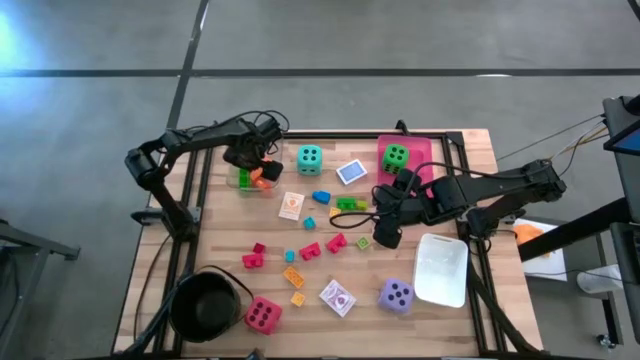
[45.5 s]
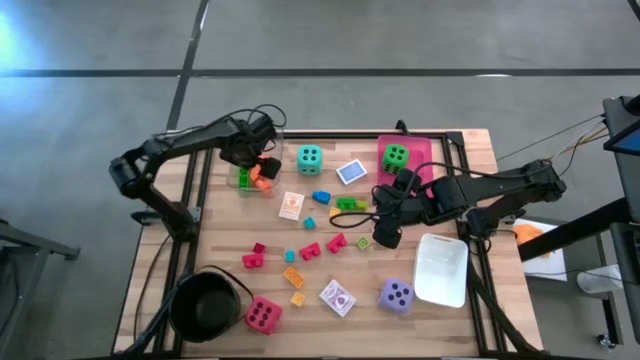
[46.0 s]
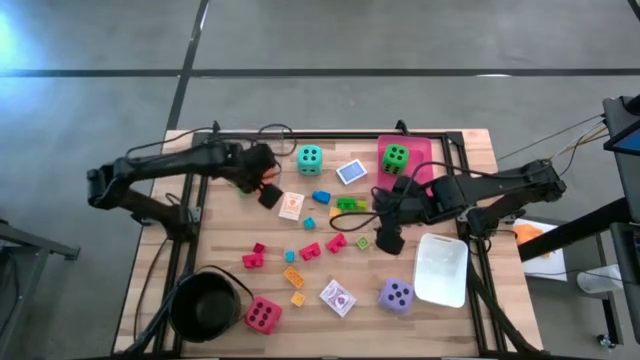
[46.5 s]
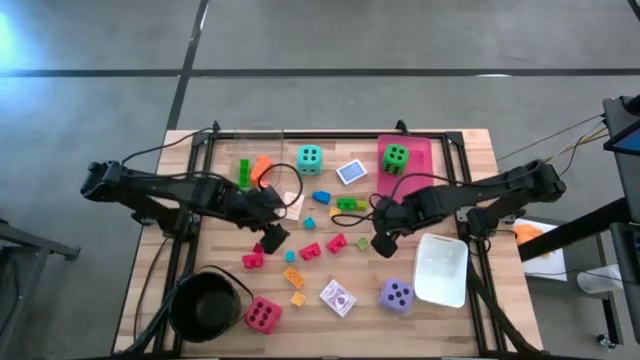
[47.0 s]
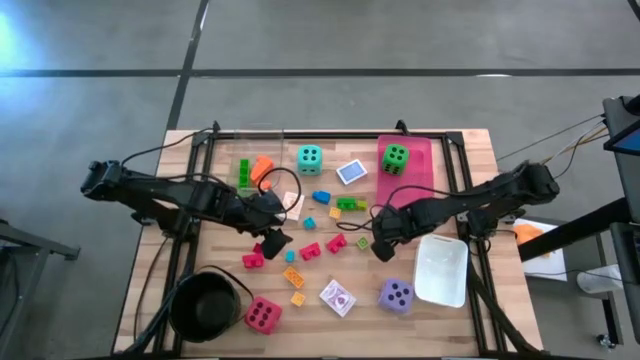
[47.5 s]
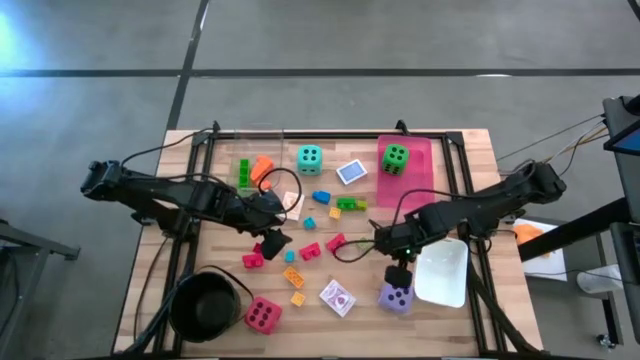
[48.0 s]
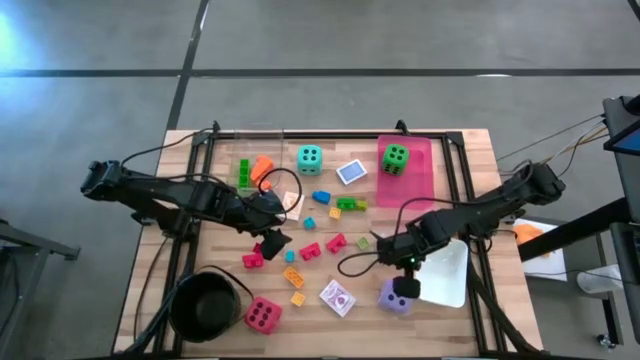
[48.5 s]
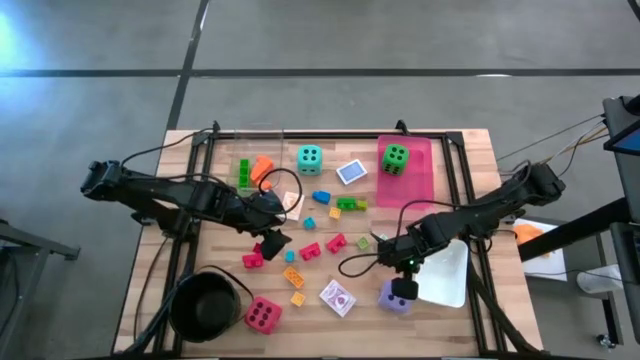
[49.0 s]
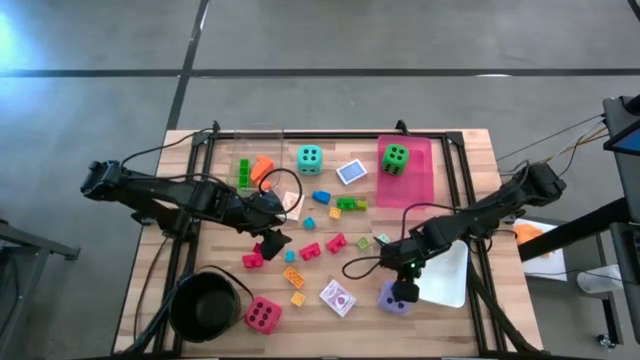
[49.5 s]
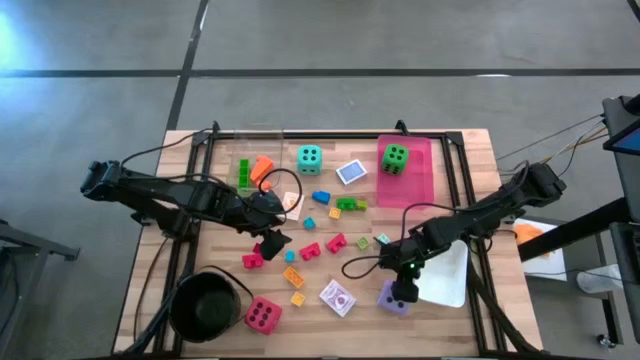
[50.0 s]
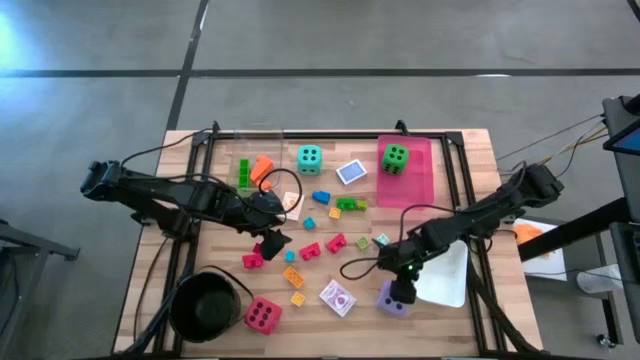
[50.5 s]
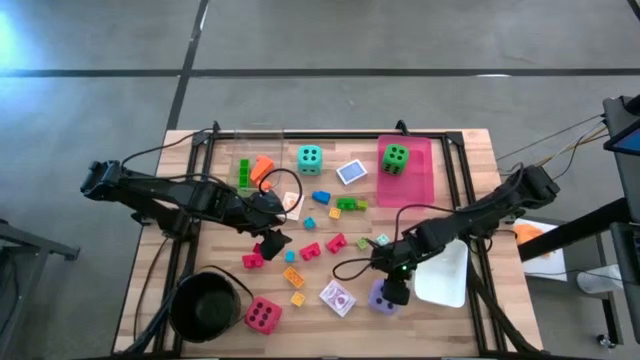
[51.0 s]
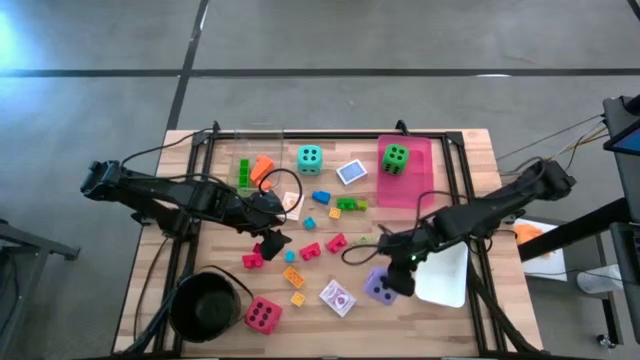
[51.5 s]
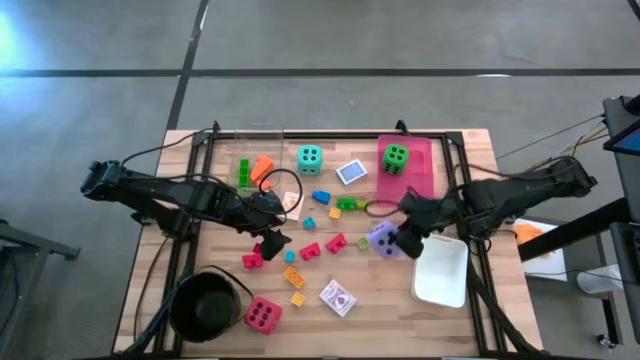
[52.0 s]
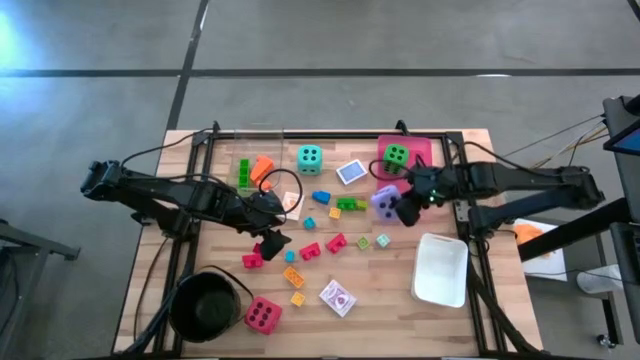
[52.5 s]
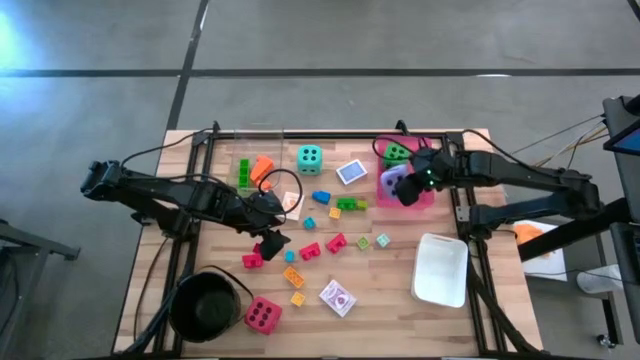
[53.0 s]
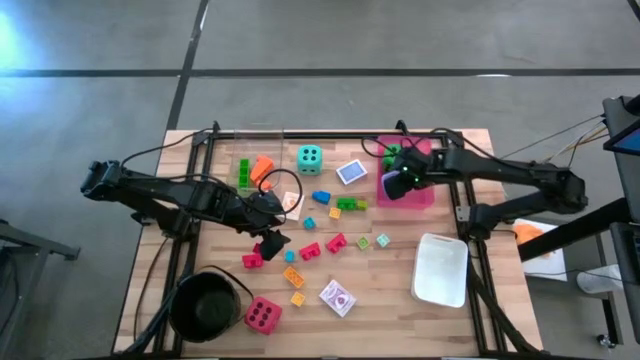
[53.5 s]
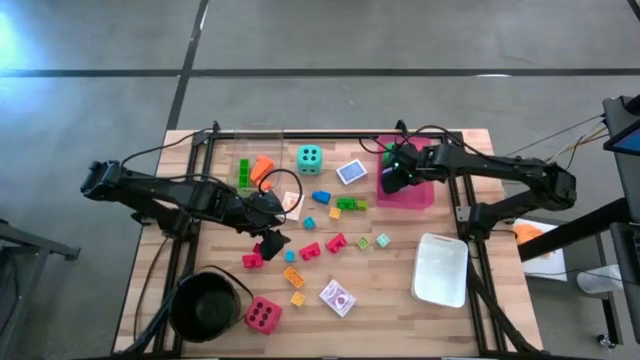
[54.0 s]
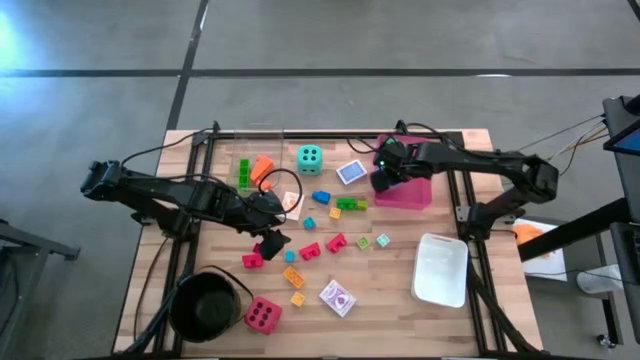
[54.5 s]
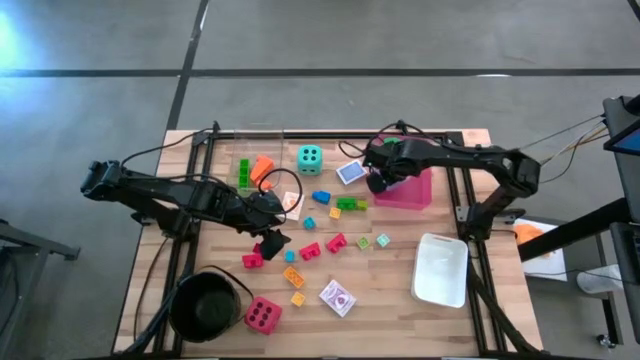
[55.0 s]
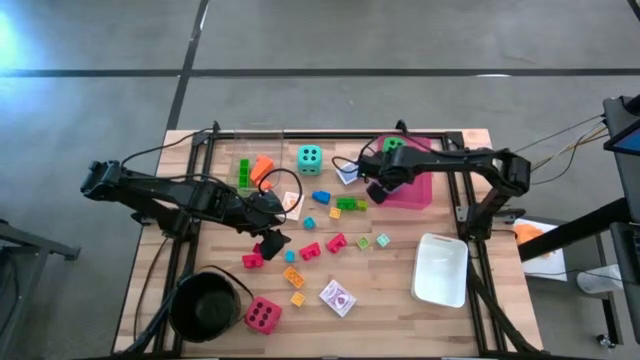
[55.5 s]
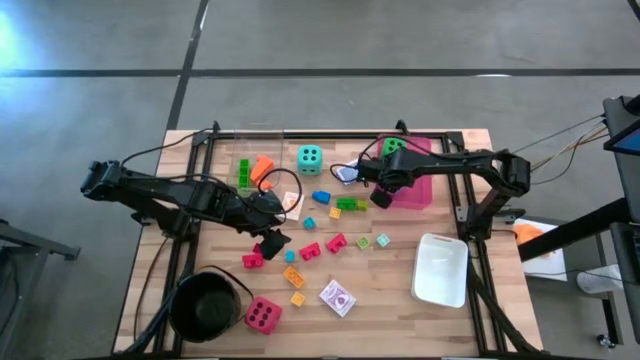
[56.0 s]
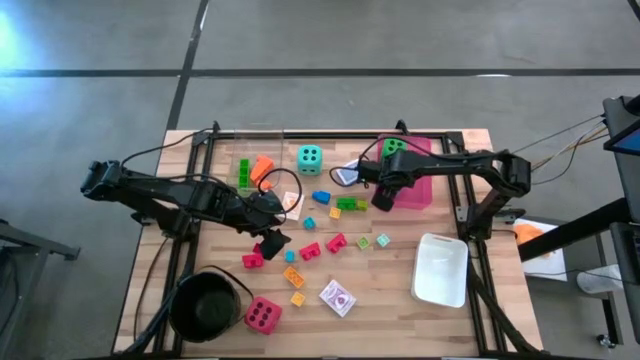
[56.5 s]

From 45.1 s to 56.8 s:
Task: Pick & Place Toys
Put the violet die into the pink bin

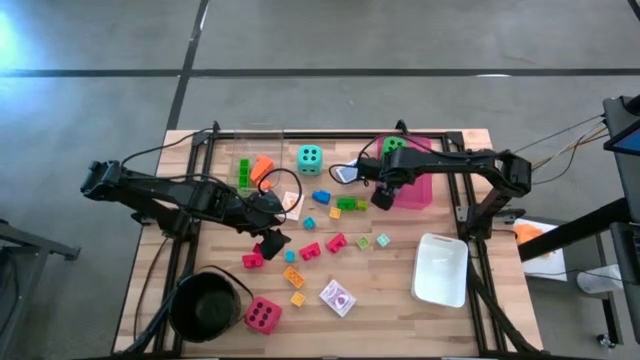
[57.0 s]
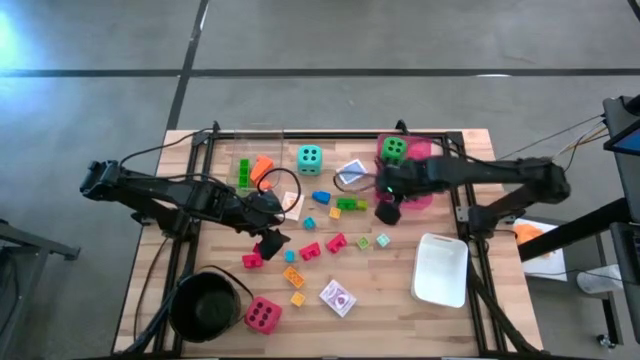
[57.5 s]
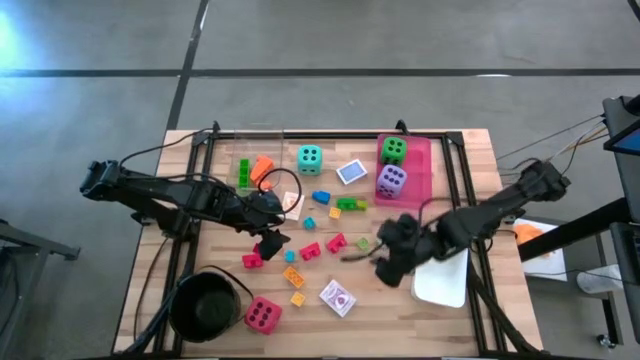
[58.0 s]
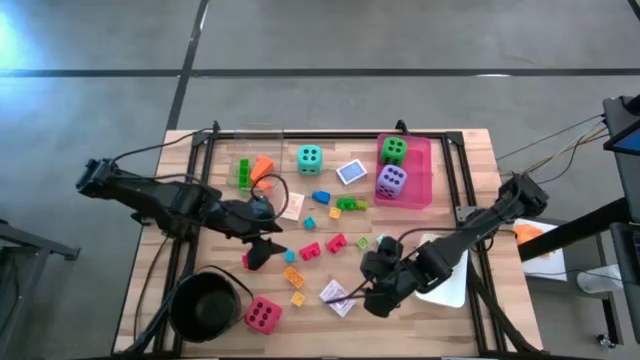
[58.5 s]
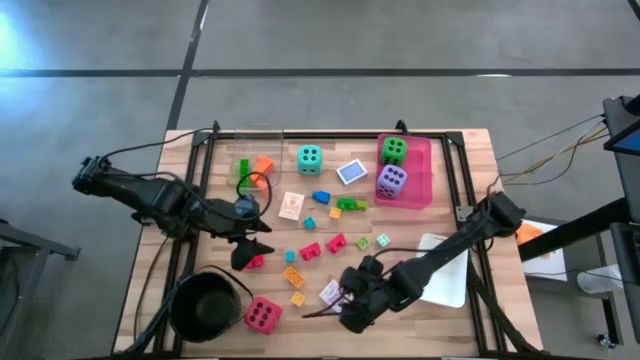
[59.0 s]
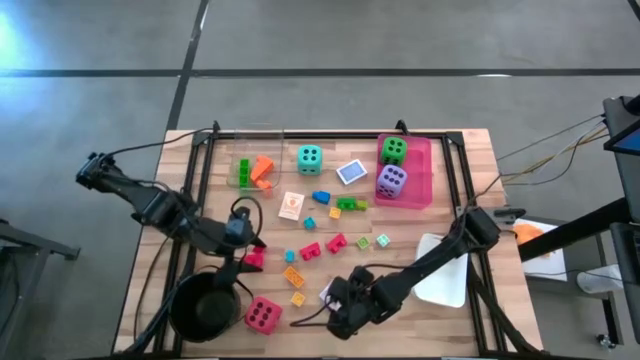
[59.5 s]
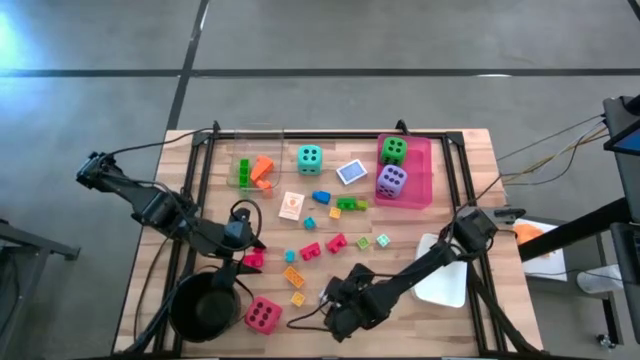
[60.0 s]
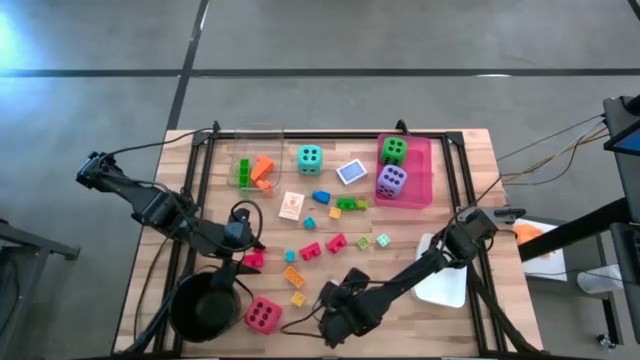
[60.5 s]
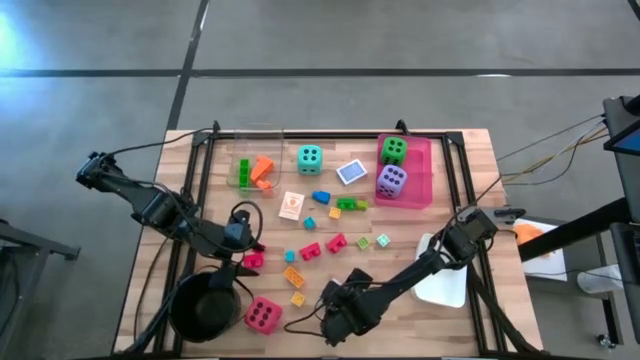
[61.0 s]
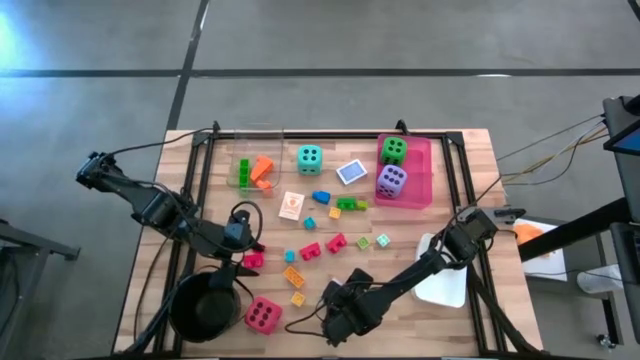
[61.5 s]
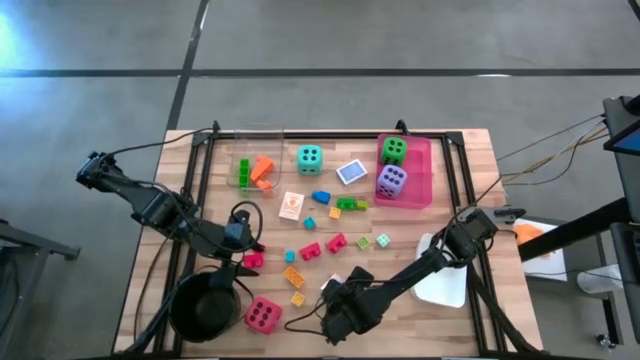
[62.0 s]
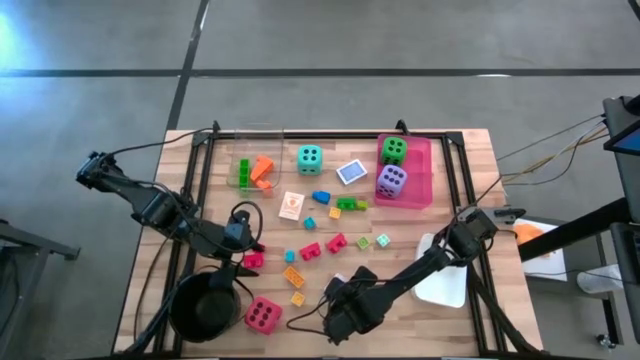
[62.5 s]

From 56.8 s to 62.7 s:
Put the purple deck of cards into the white bin

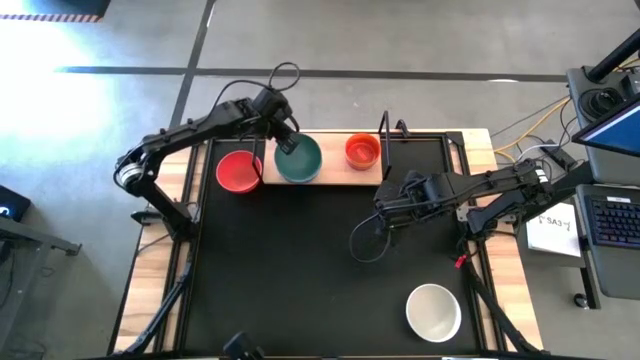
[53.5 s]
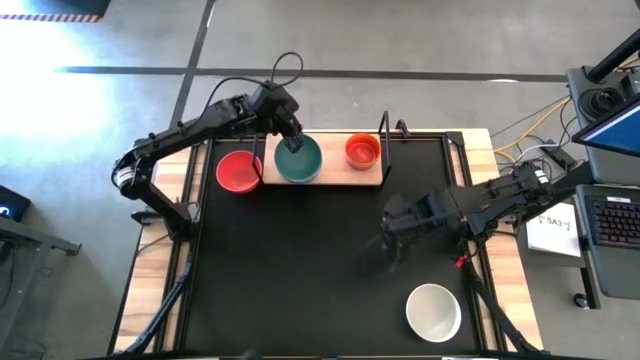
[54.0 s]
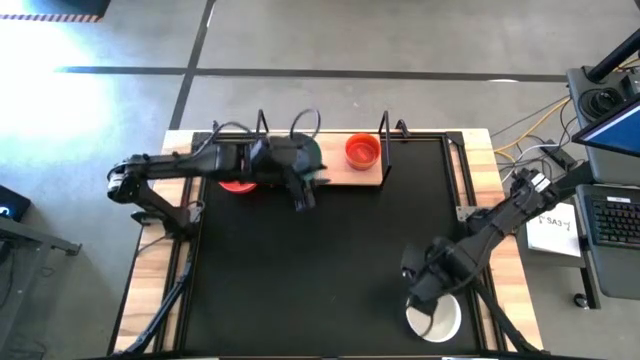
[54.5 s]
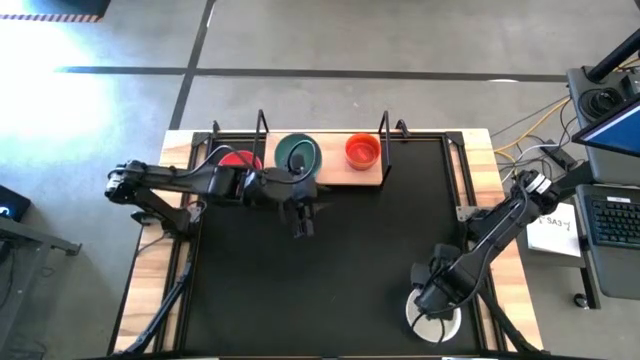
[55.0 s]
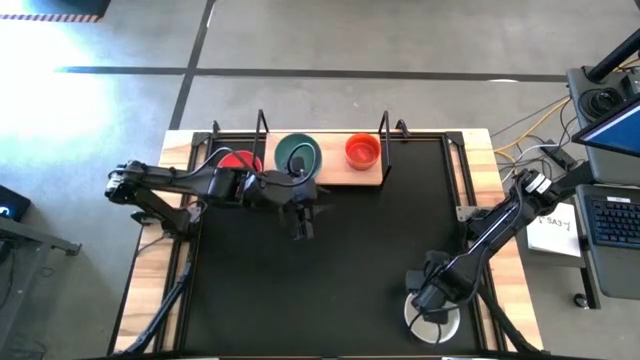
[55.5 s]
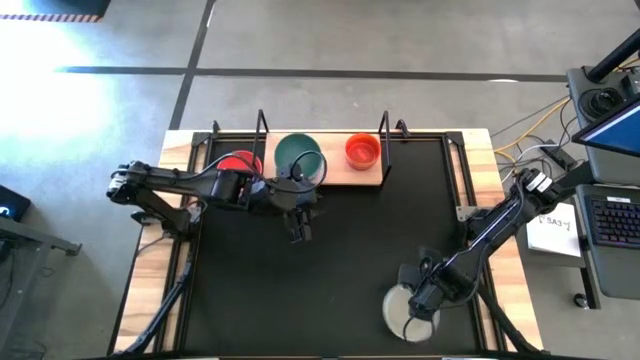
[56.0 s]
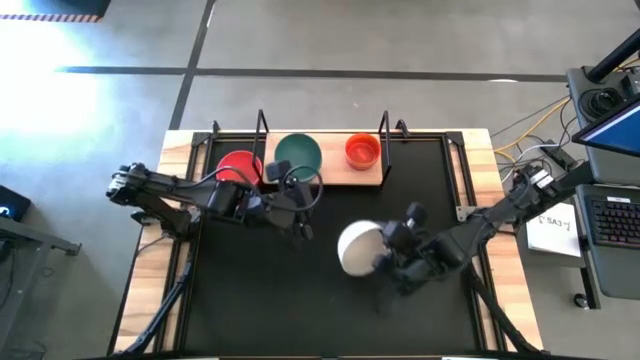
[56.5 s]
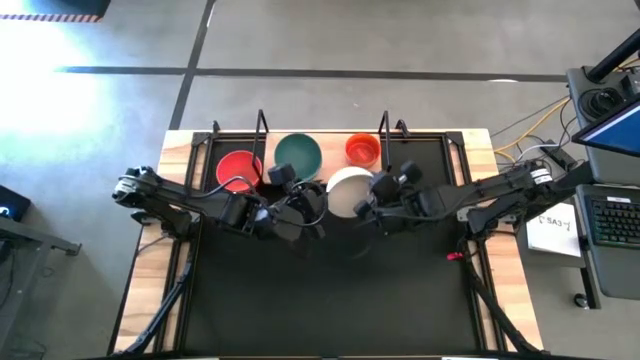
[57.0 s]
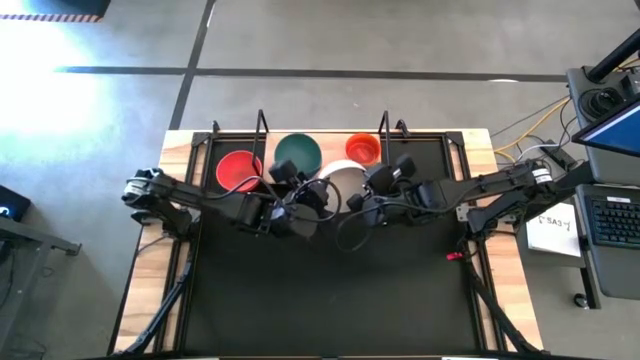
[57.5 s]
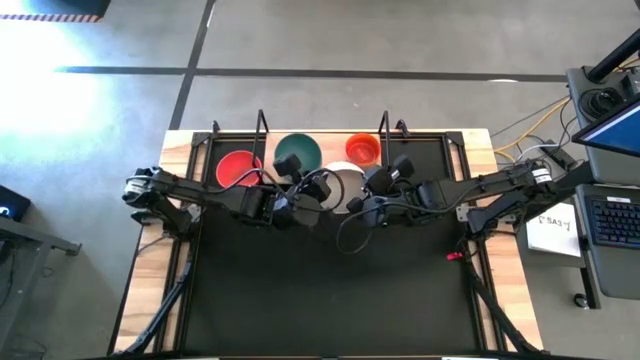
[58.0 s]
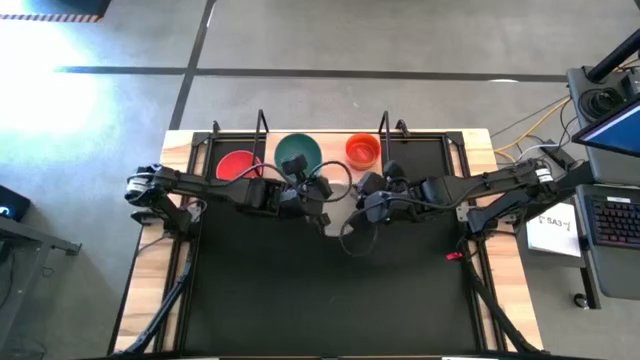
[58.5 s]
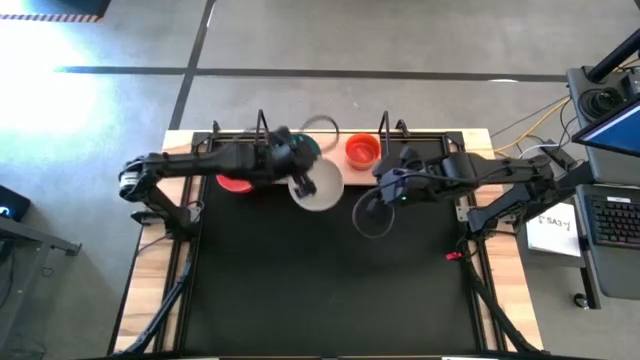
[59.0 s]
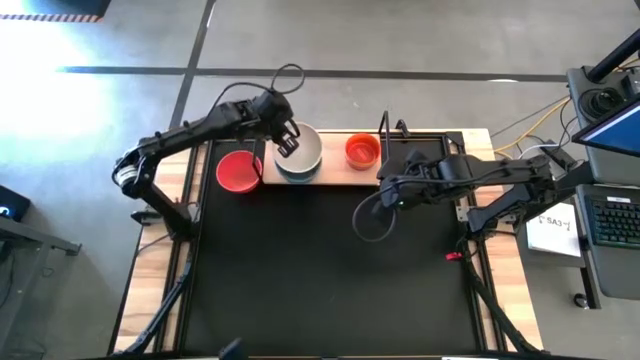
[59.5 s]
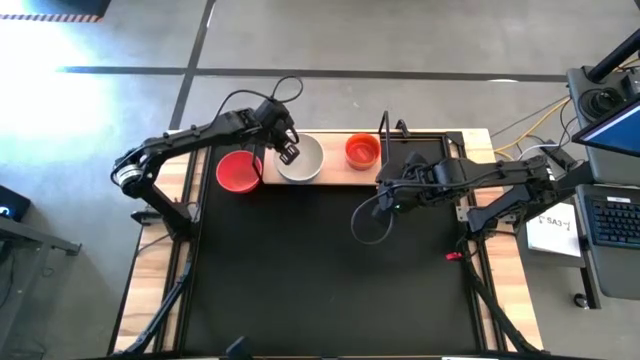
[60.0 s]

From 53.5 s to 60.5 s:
Task: Place and stack bowls onto a shelf
Stack the white bowl on top of the green bowl on the shelf
